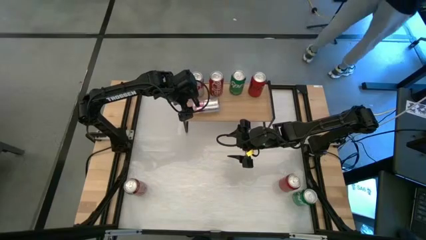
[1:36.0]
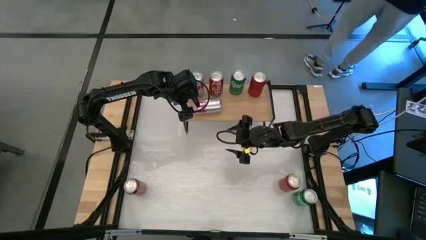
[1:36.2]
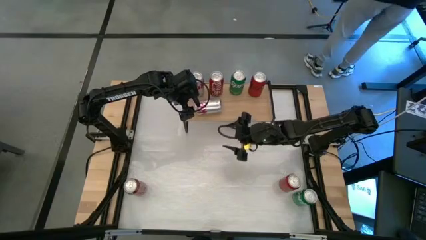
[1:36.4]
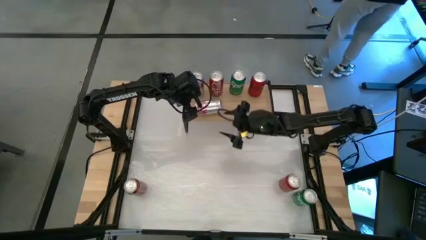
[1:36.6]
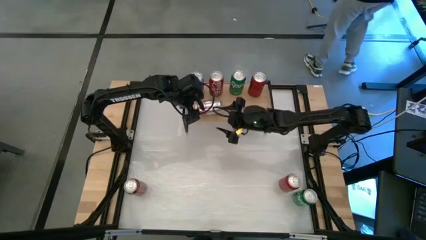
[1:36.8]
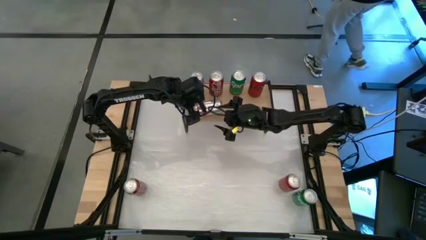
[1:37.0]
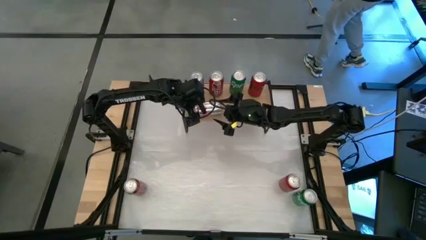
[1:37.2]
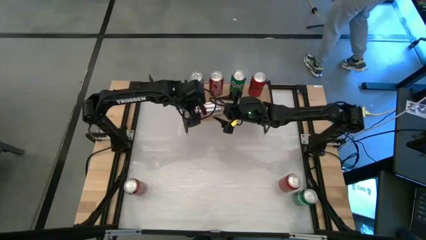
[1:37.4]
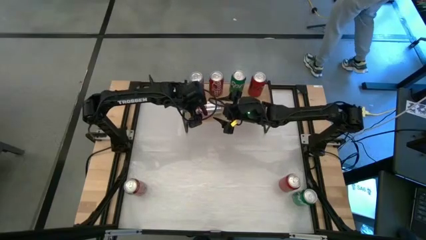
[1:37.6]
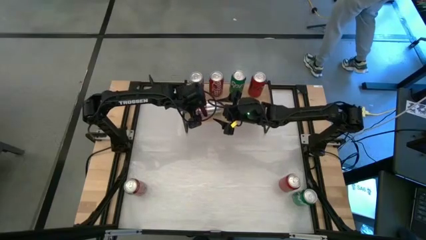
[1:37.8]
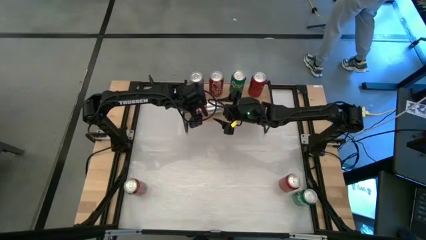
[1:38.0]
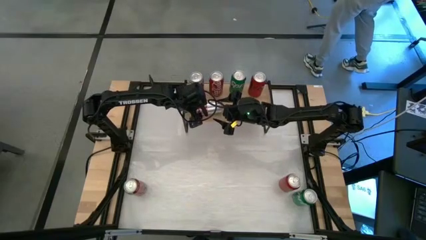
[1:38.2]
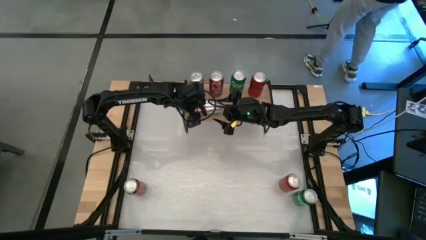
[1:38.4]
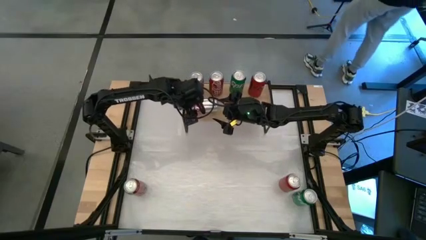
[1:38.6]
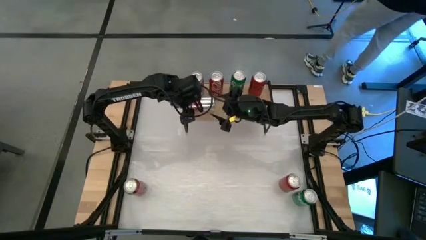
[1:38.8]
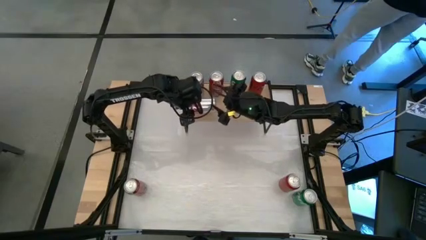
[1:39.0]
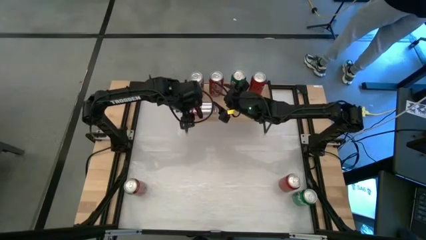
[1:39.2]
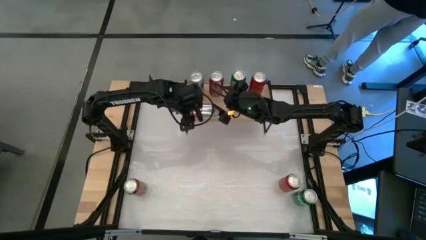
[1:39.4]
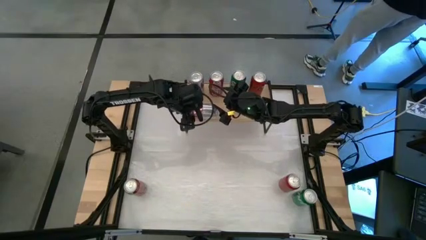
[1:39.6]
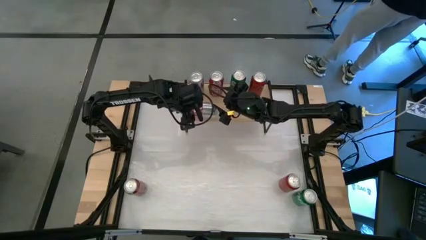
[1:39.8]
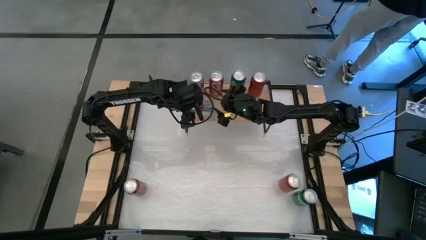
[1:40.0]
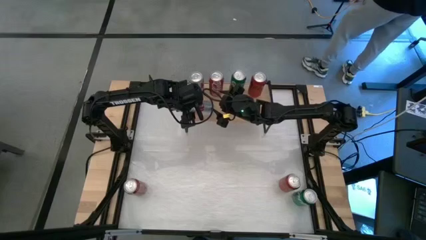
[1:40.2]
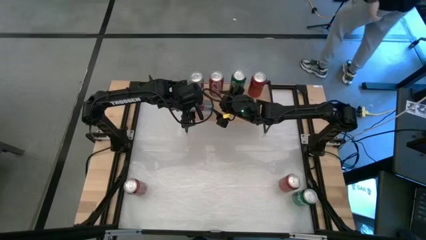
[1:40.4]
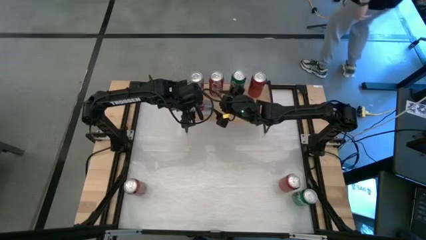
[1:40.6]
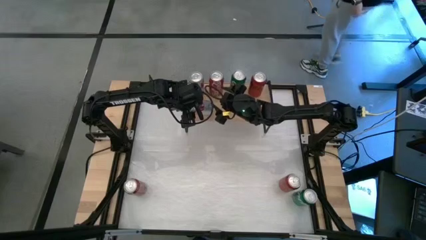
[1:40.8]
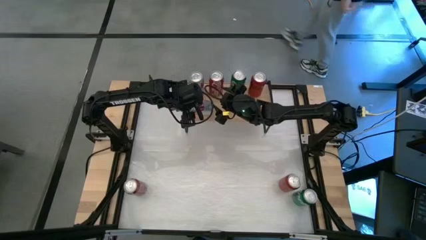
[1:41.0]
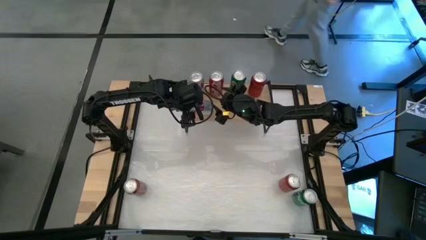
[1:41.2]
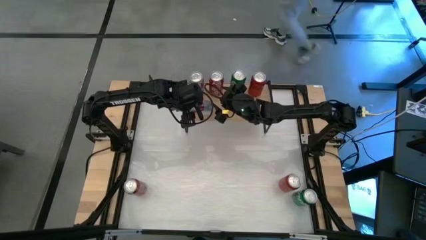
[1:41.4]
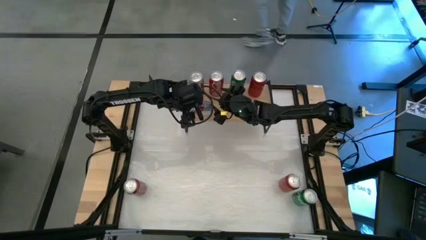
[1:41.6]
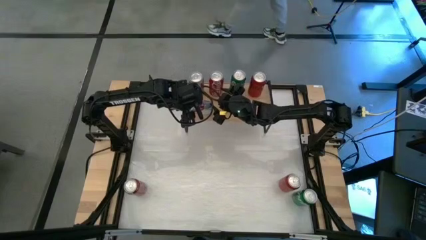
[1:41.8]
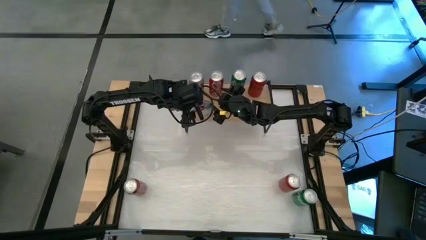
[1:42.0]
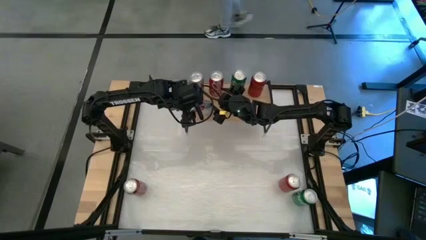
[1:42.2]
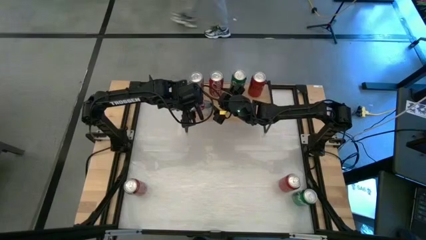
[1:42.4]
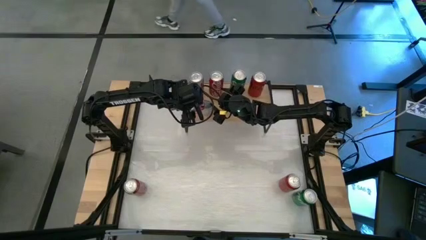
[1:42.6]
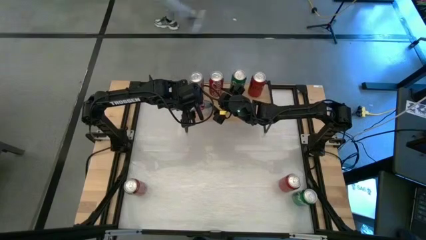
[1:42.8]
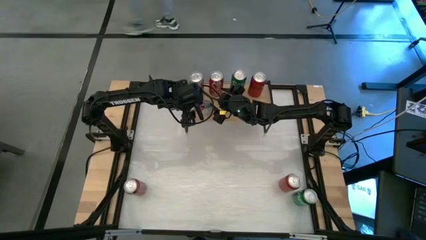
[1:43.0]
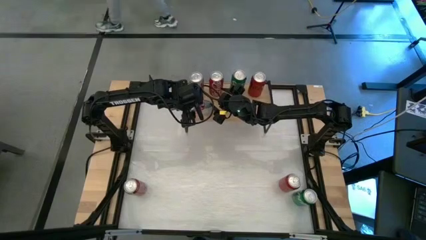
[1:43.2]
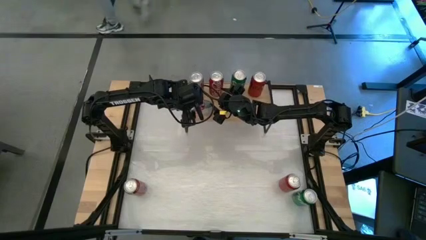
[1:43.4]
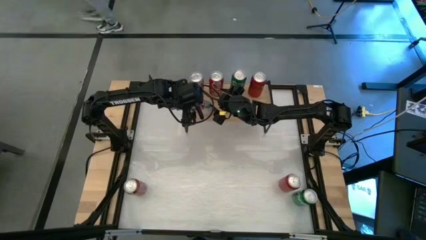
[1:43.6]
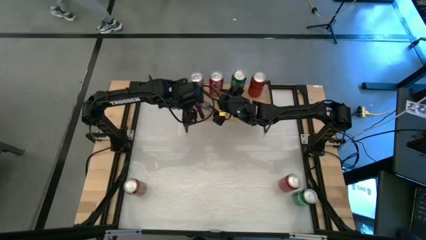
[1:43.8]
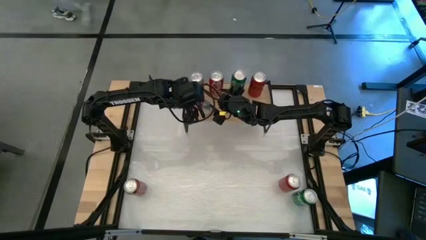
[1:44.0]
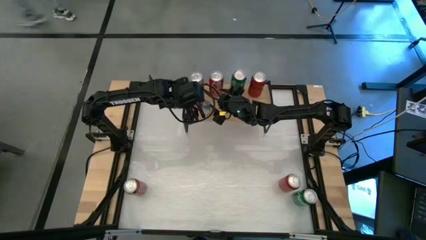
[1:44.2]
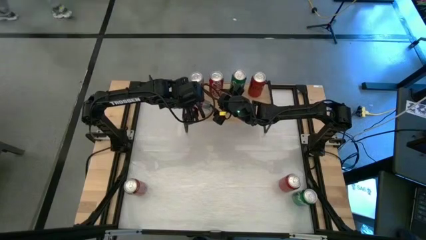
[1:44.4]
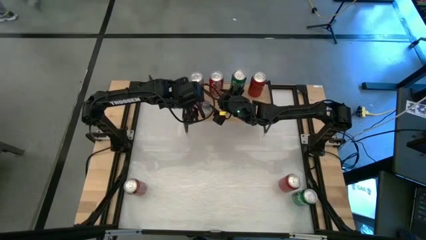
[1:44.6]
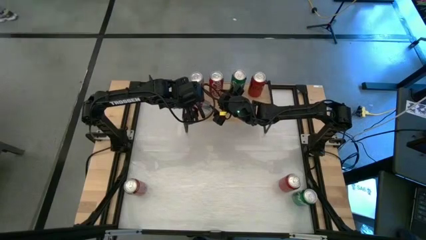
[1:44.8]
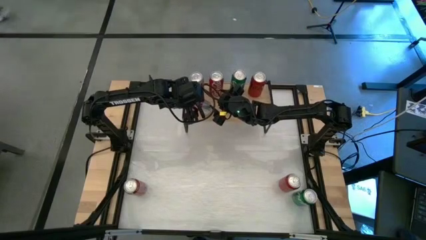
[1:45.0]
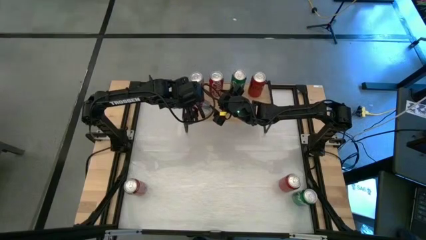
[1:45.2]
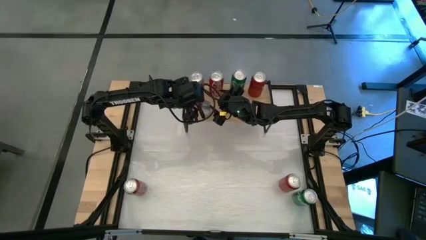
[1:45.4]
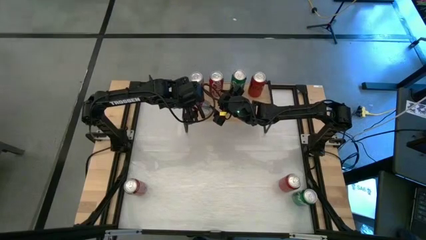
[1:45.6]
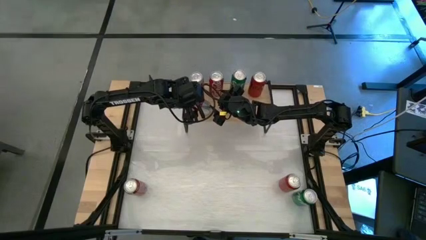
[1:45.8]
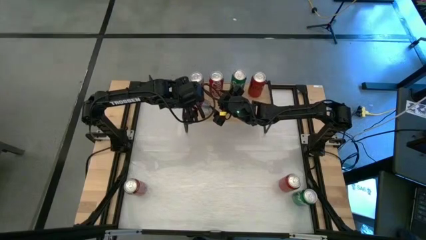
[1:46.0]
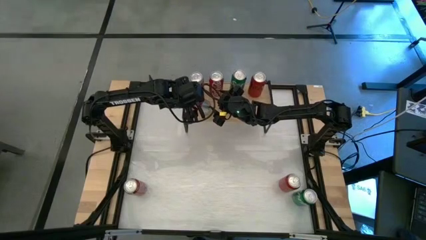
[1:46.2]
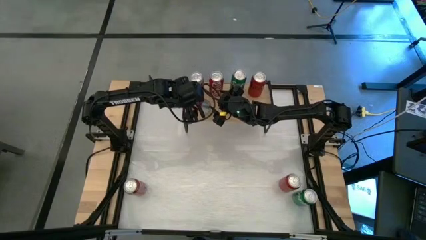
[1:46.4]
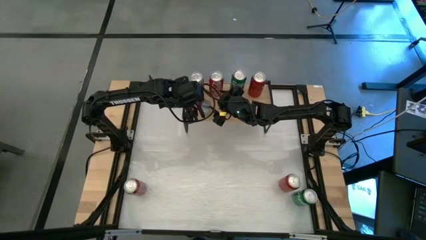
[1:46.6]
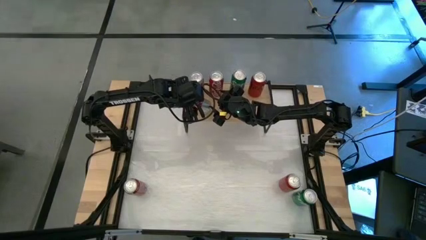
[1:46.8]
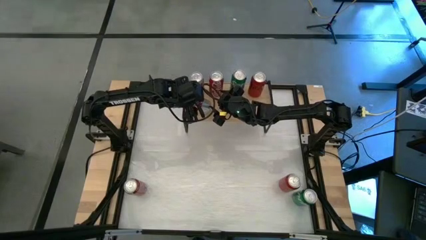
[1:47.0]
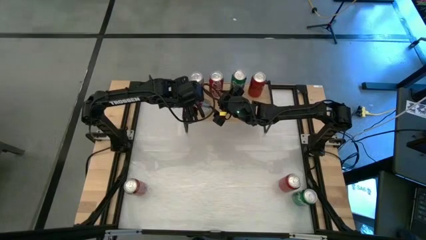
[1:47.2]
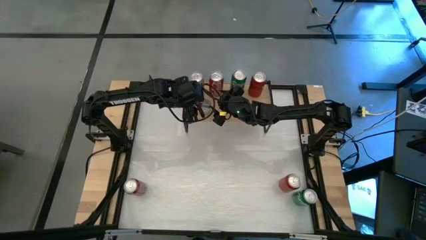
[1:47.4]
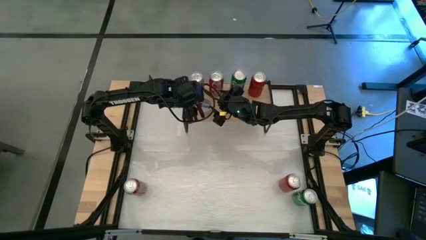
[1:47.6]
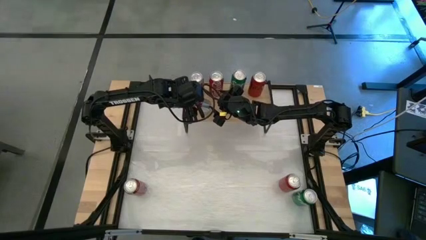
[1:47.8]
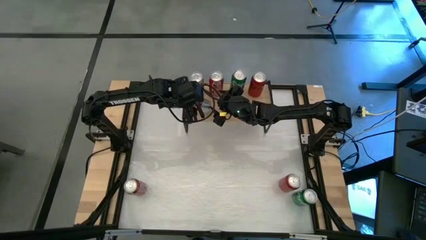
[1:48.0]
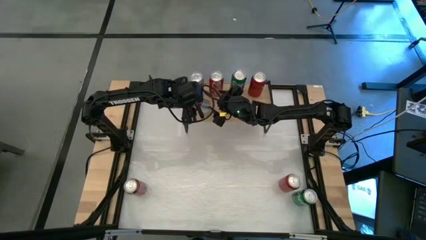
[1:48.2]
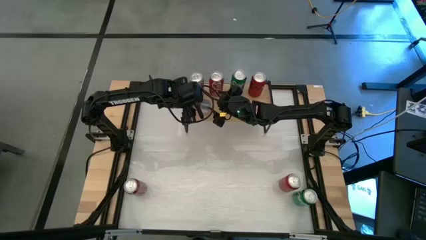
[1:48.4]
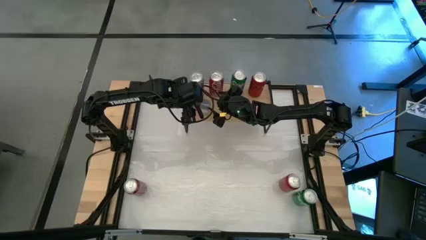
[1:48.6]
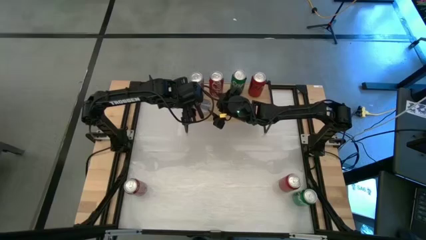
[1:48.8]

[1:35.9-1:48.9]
Task: Place canned beverage on shelf
Put the red-silver soda can aligned with the other red-silver soda can on the shelf

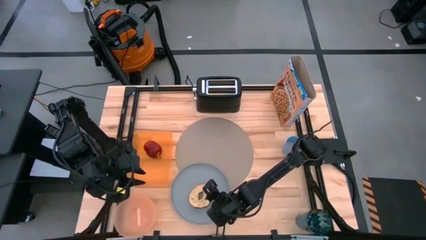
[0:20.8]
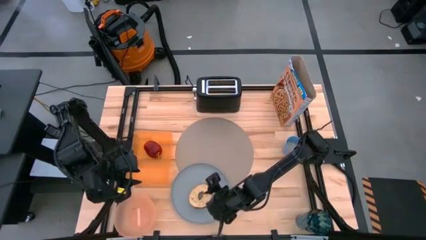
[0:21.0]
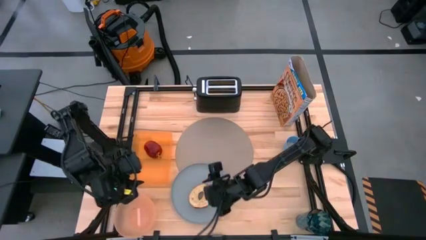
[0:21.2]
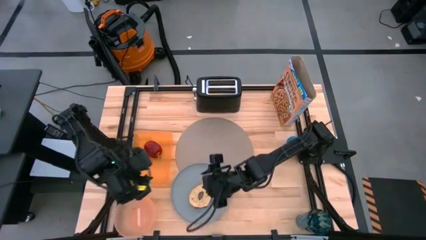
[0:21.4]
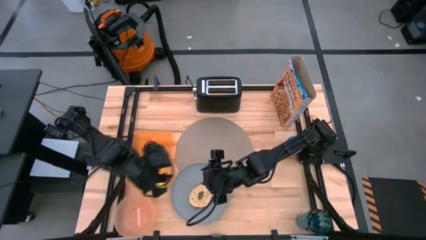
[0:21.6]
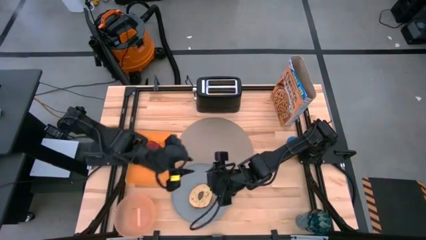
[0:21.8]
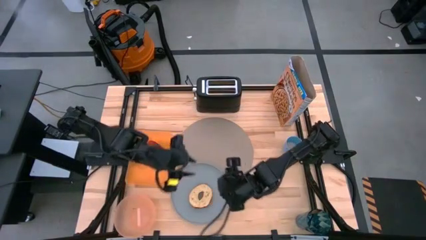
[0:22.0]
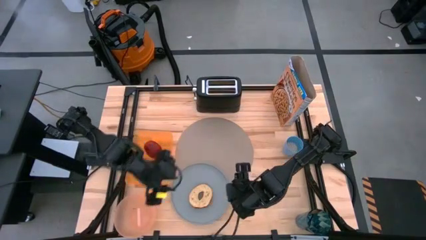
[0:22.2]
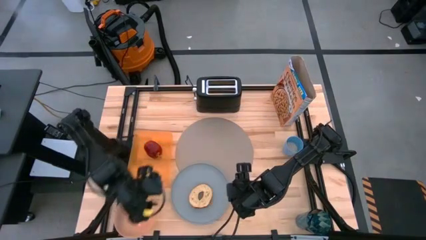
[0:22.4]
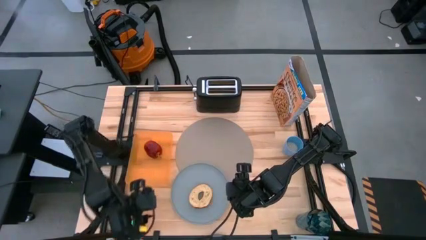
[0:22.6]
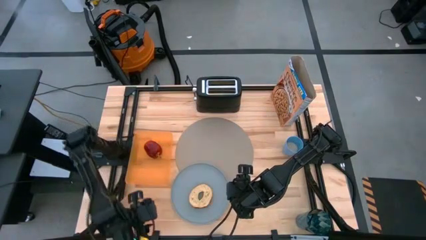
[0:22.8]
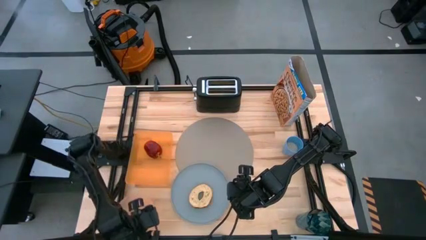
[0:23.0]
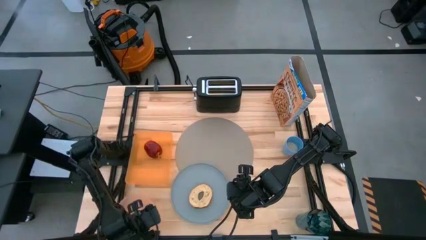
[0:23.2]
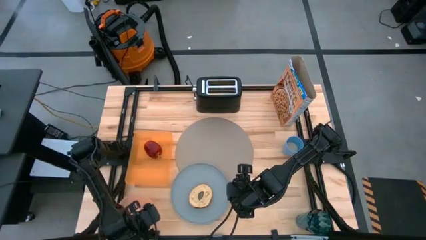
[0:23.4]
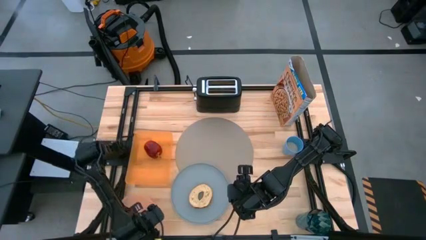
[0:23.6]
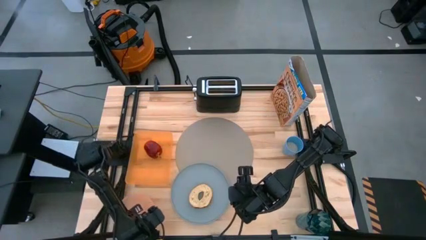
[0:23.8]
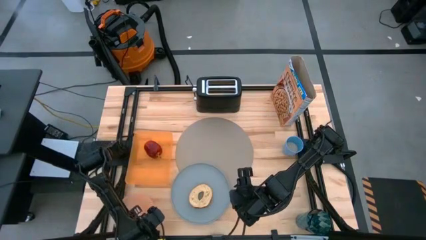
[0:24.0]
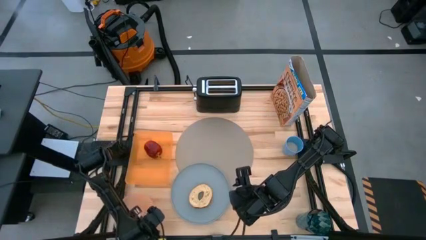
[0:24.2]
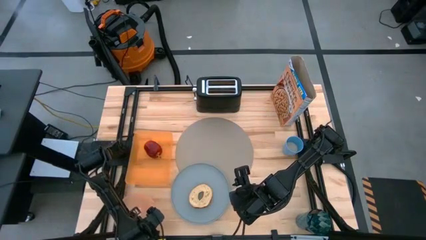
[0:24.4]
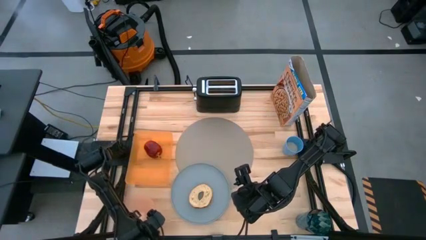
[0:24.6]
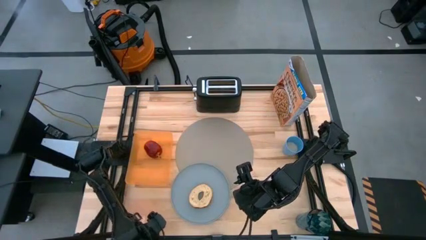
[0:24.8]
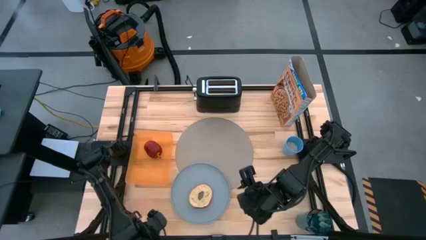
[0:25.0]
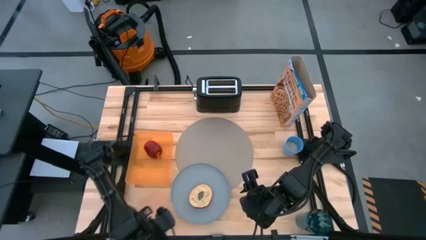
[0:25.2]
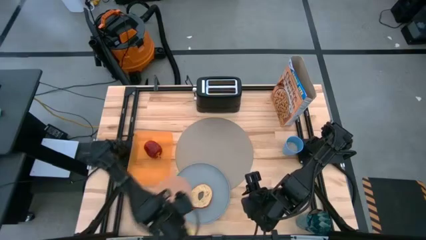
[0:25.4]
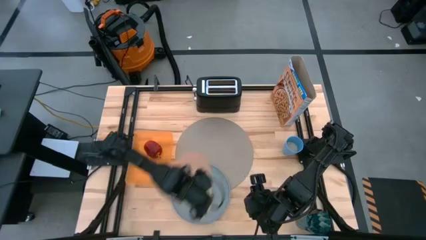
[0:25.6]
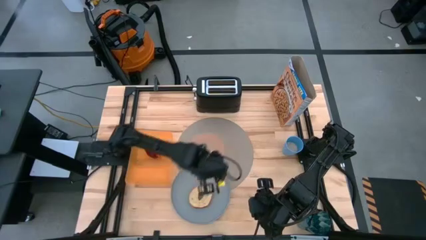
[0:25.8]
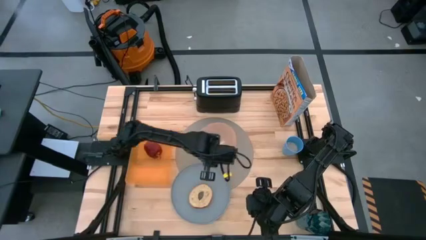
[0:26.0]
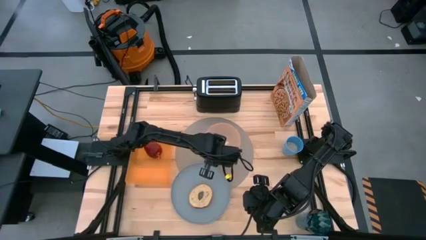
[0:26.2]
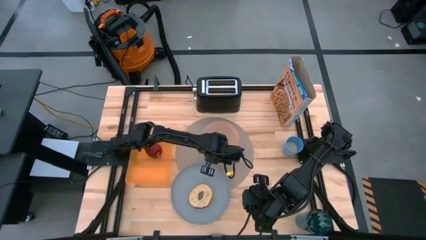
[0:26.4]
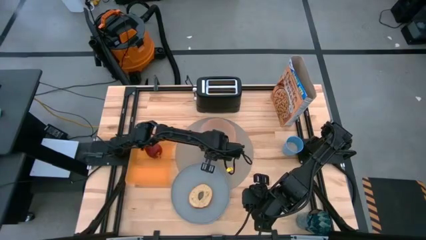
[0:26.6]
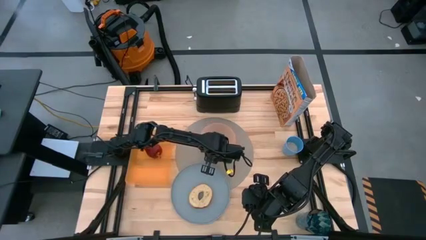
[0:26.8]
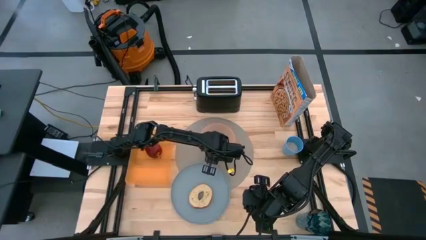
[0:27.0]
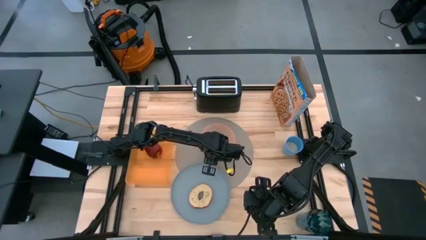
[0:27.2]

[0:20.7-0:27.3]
Task: Arrange a breakfast setting
Put the peach bowl onto the top right gray placemat
